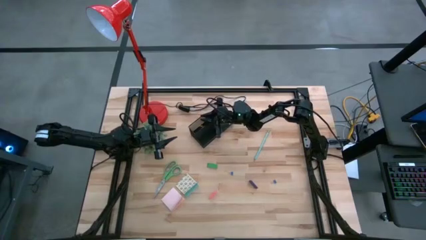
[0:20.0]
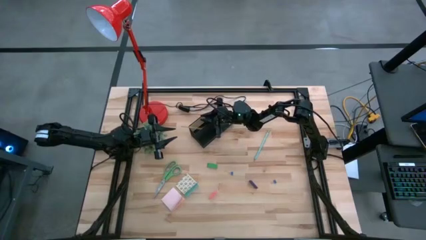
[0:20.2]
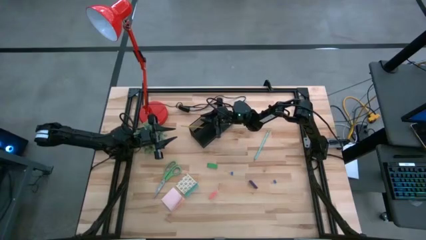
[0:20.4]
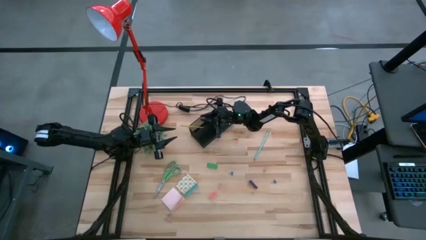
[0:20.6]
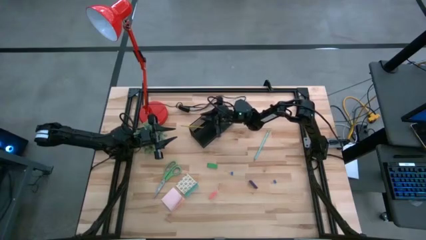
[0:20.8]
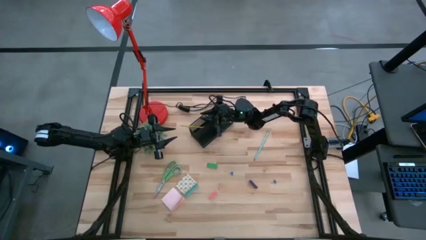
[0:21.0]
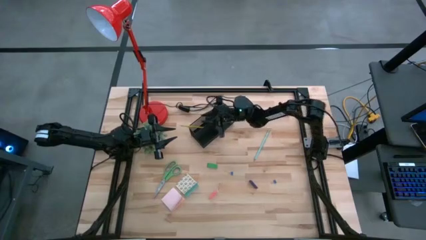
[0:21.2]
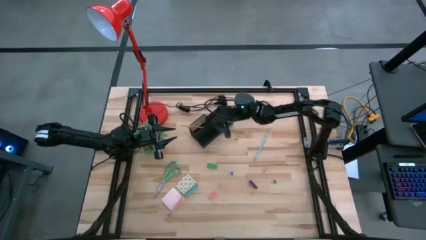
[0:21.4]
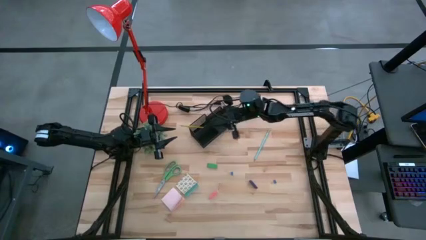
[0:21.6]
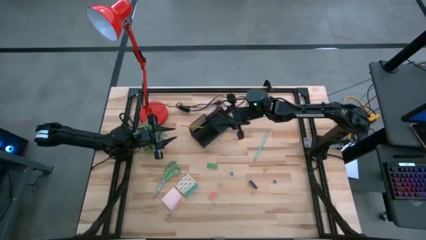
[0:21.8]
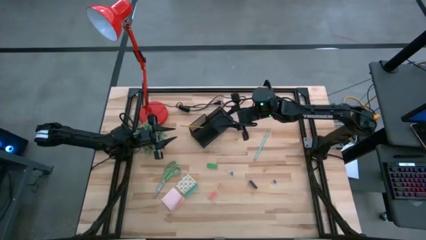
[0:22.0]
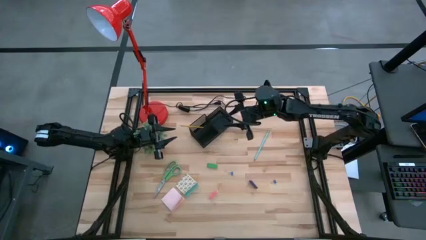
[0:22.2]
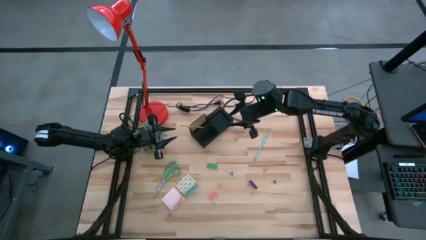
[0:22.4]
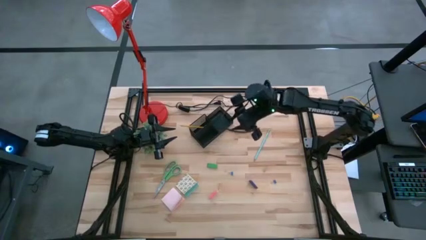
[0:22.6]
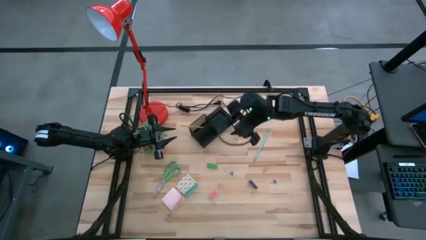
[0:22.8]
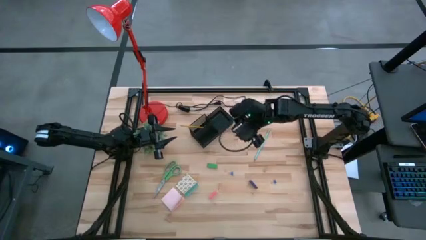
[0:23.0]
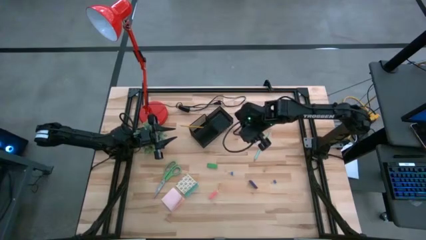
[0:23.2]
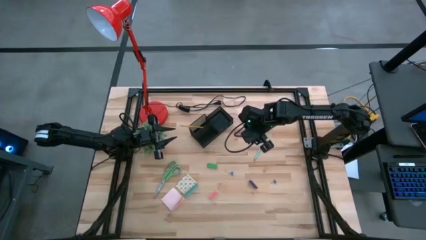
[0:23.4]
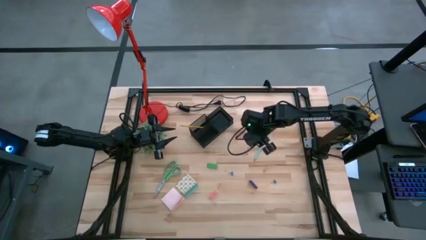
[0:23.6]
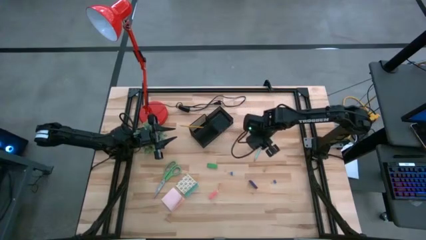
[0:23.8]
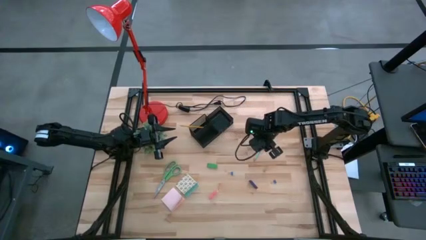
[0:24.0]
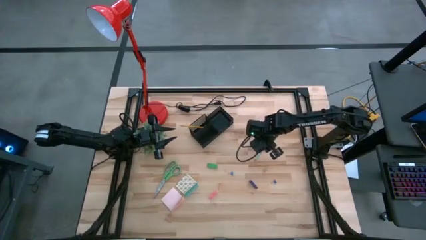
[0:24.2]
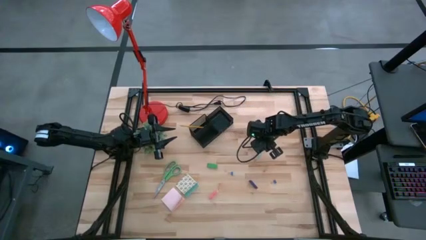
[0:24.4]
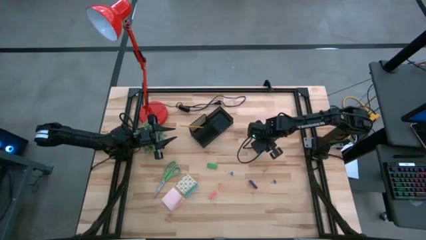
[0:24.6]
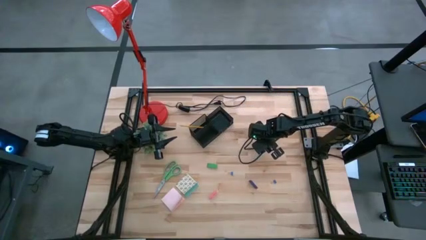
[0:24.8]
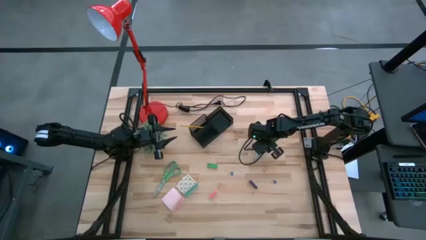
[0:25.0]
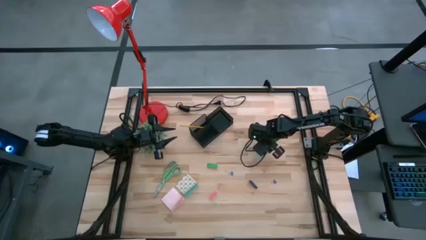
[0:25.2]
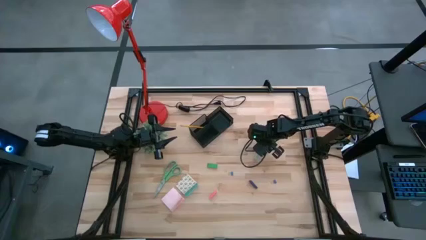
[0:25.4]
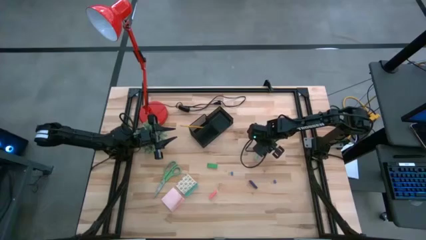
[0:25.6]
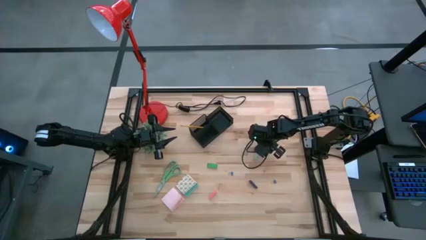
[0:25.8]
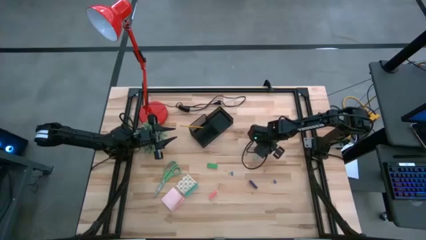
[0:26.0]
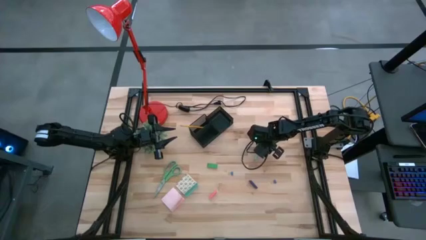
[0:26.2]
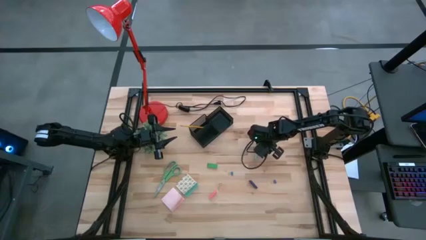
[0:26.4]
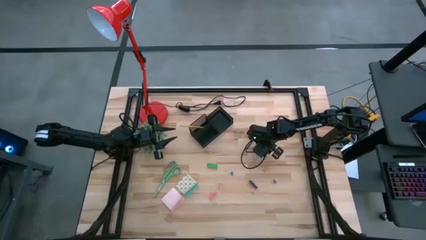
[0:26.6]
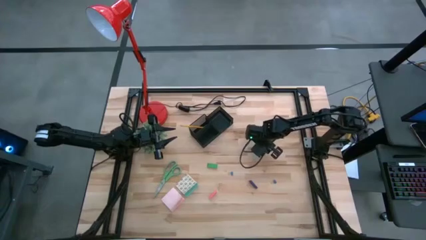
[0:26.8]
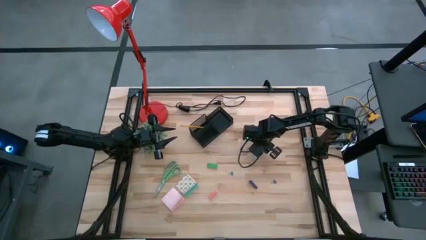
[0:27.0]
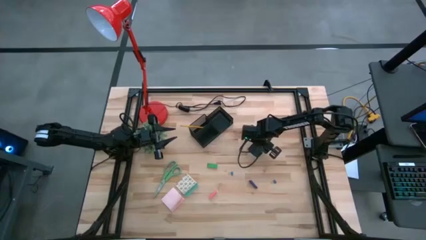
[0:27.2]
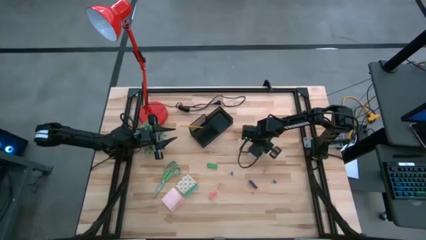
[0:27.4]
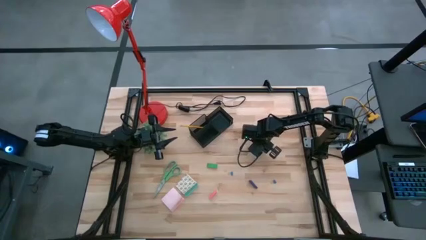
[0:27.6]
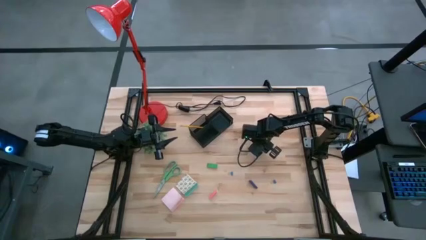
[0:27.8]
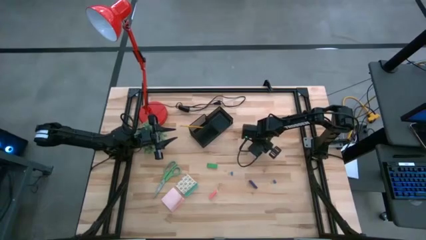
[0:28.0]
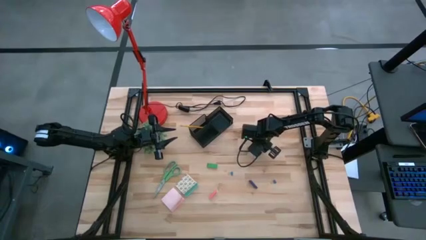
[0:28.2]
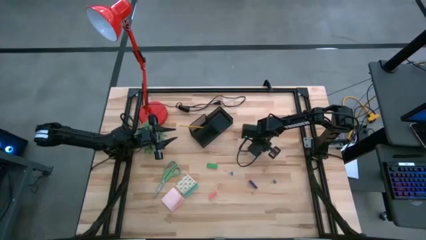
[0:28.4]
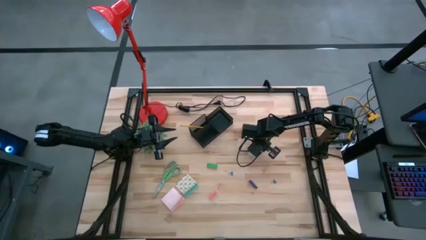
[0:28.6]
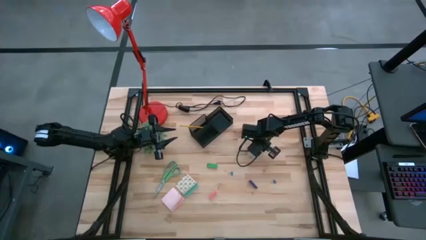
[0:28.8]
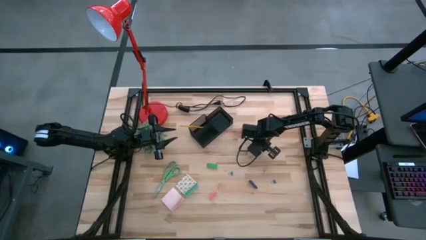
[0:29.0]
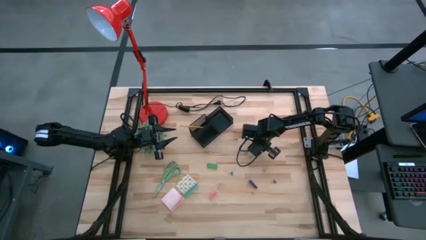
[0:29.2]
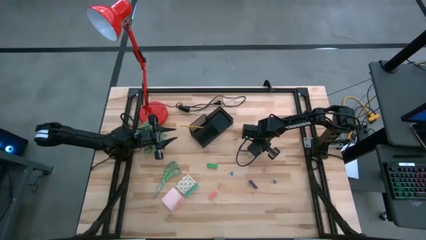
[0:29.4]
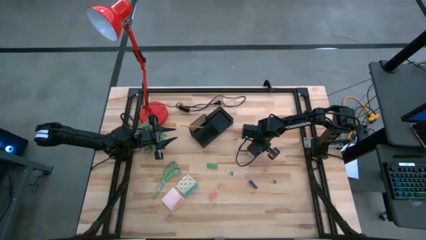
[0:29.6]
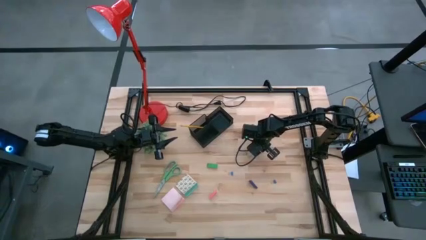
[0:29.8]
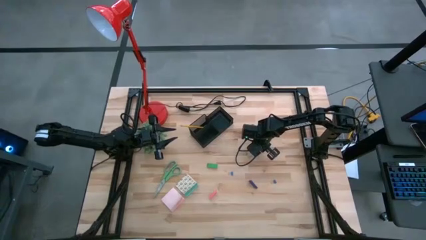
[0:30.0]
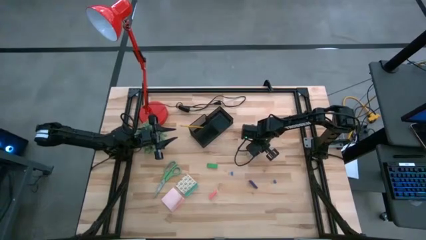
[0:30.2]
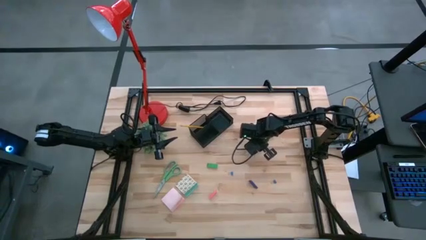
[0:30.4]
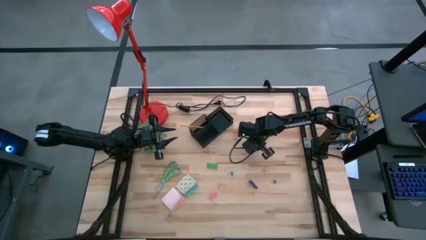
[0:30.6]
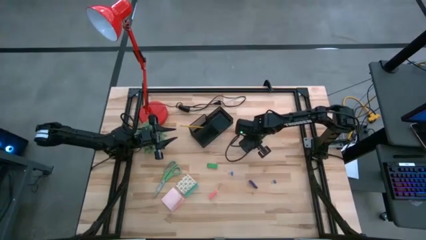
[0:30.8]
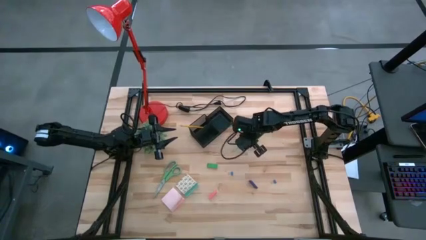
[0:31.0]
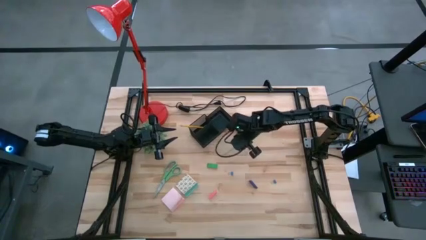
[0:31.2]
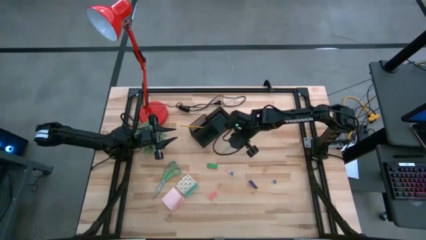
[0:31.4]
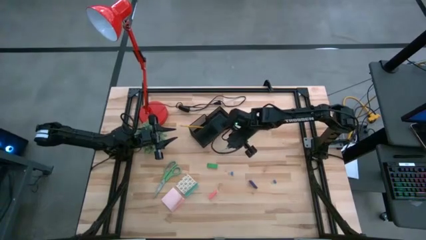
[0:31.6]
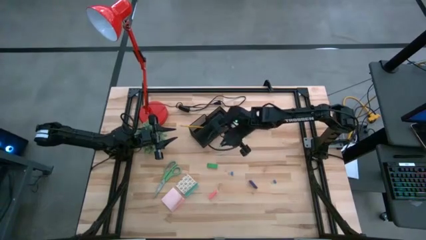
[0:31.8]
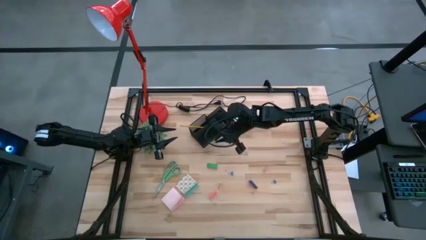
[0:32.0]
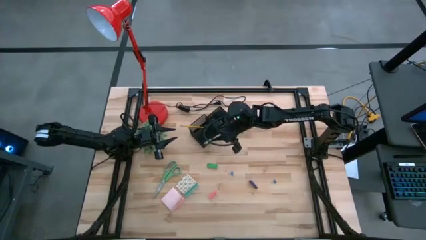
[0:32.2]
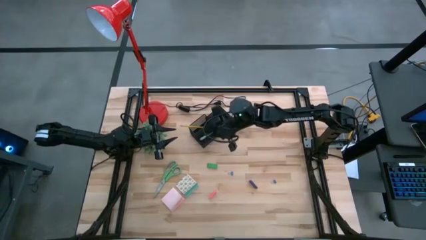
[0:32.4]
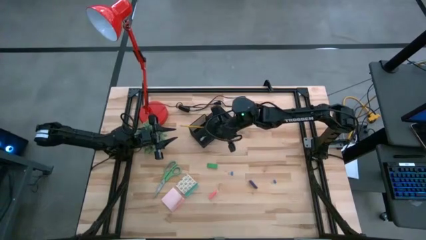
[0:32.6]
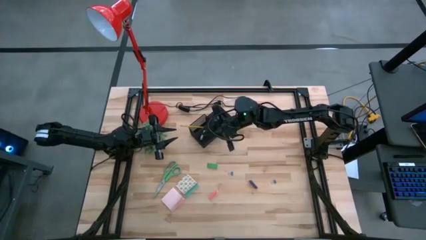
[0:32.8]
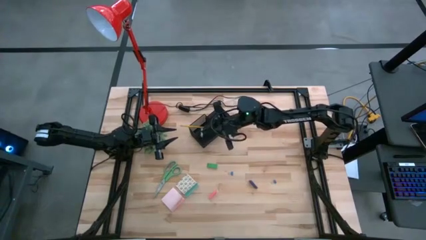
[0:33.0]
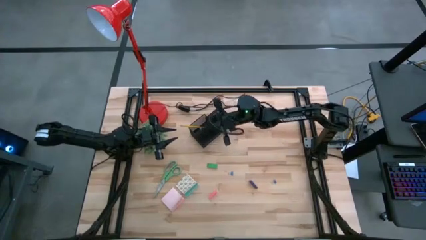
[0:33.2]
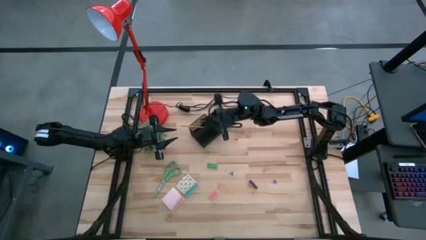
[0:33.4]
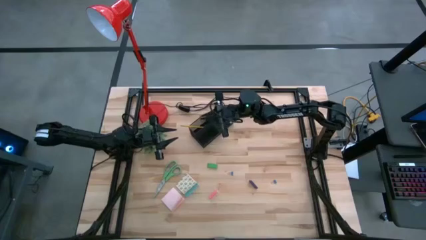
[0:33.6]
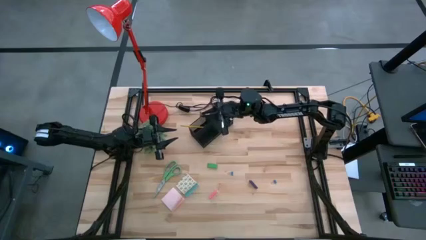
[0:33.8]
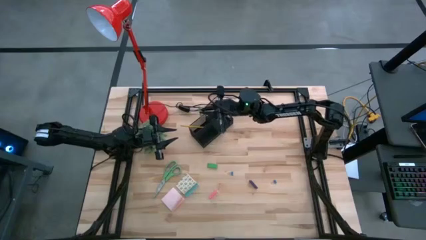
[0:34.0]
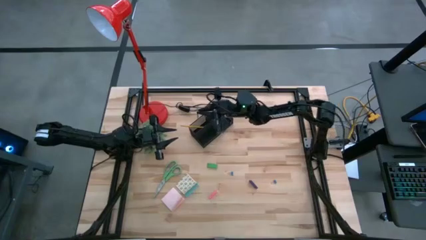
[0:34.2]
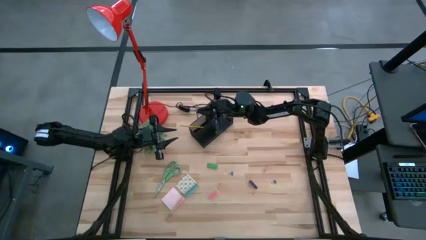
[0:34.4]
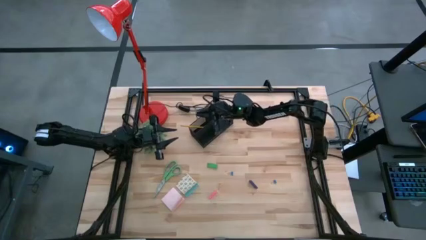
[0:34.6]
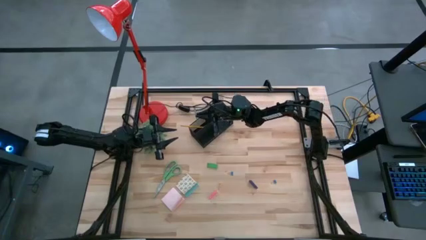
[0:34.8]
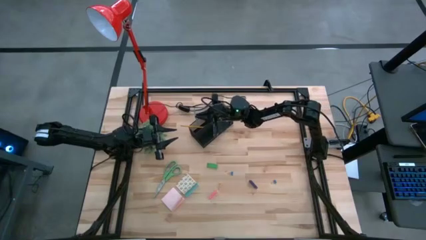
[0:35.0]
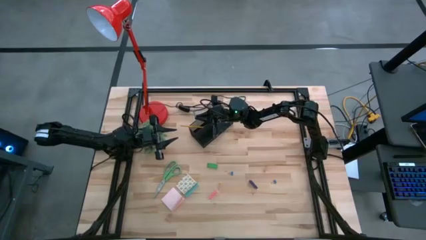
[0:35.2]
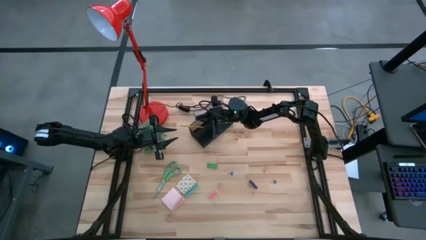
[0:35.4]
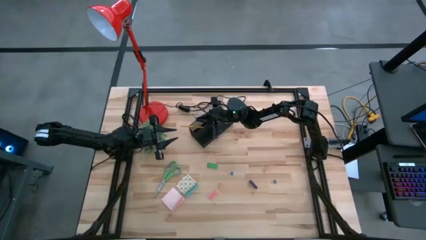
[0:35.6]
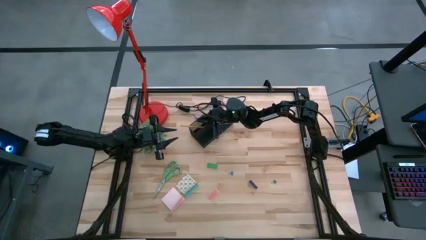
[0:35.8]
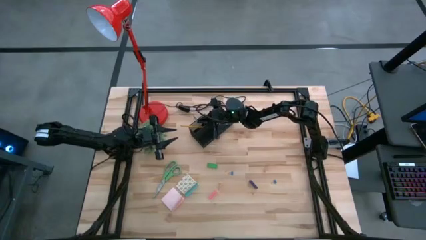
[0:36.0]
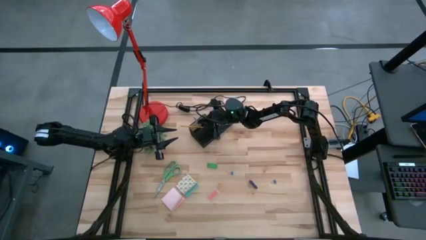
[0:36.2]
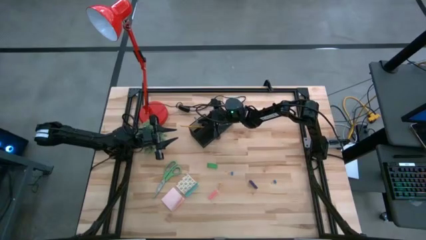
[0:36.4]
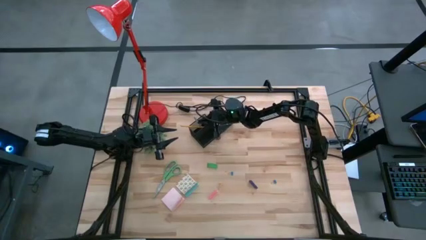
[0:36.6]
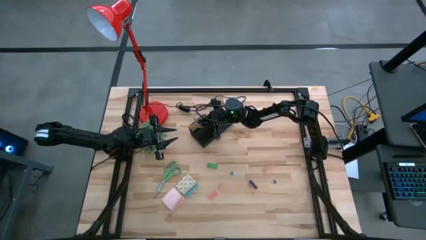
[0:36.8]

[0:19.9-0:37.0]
Task: Pick and place office supplies into organizer
Put the light blue pencil into the black desk organizer
